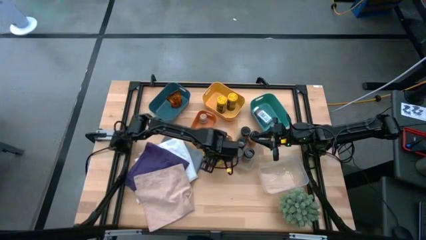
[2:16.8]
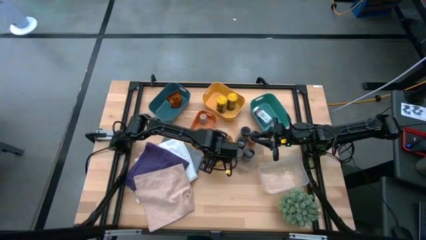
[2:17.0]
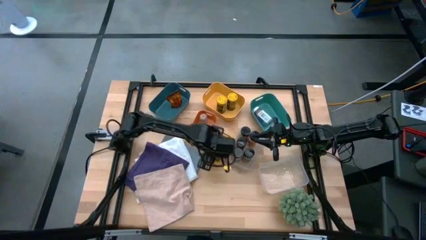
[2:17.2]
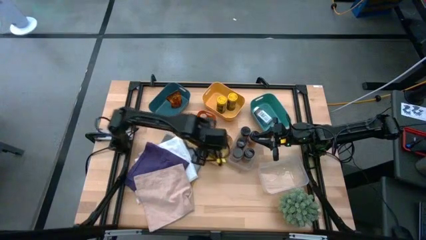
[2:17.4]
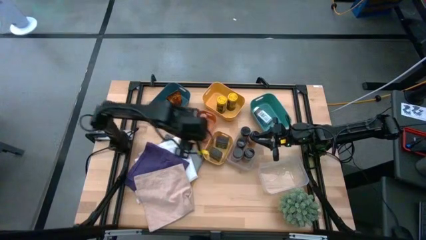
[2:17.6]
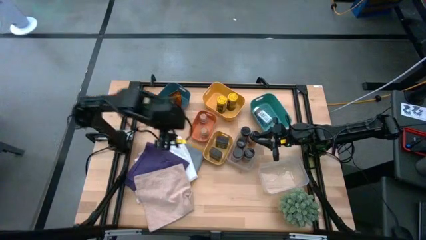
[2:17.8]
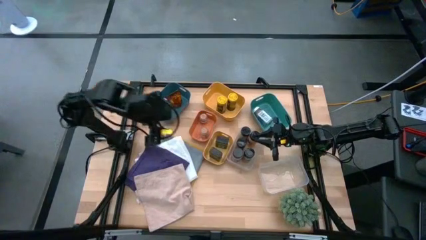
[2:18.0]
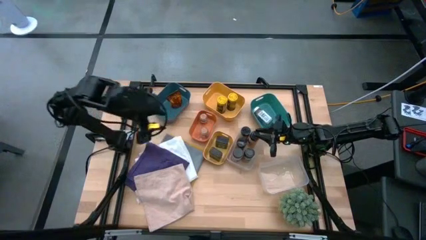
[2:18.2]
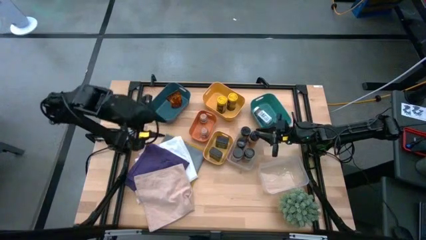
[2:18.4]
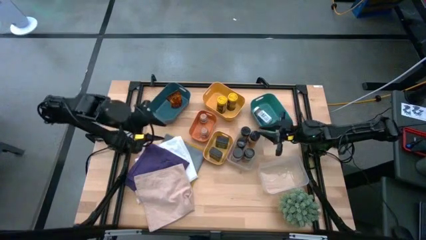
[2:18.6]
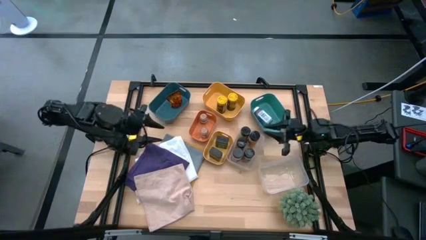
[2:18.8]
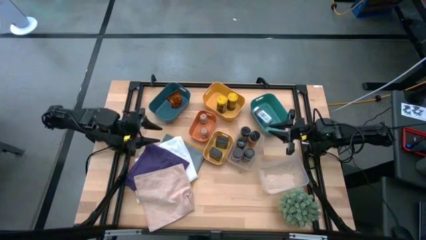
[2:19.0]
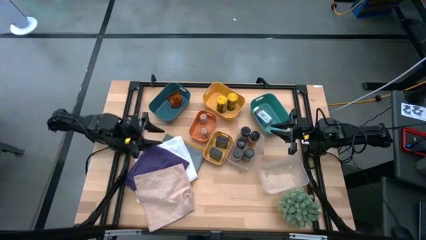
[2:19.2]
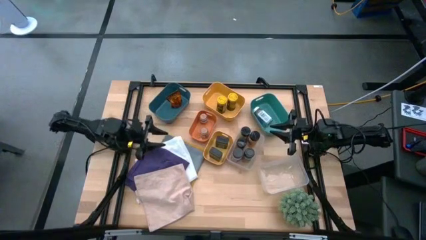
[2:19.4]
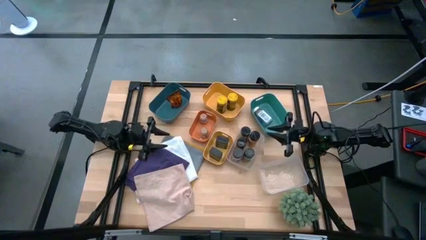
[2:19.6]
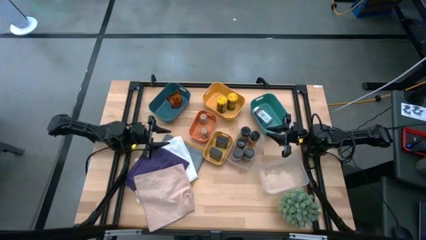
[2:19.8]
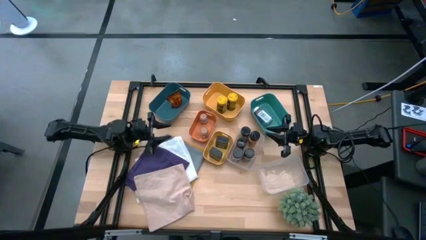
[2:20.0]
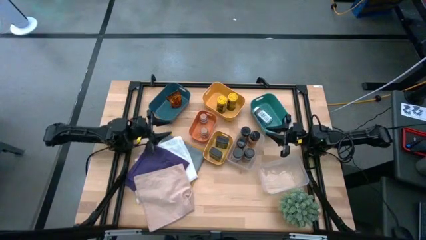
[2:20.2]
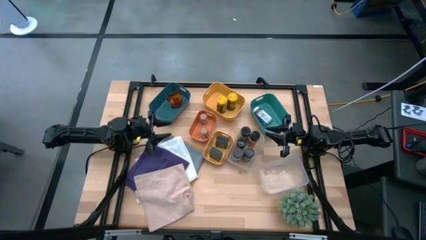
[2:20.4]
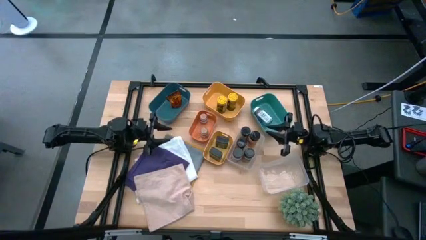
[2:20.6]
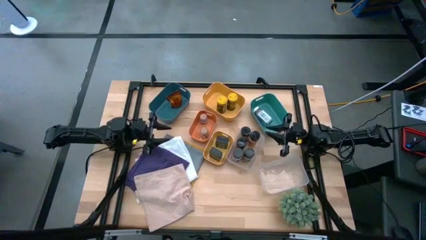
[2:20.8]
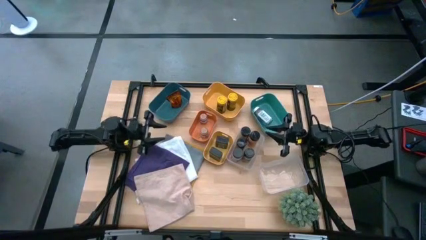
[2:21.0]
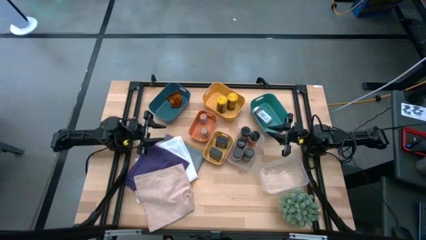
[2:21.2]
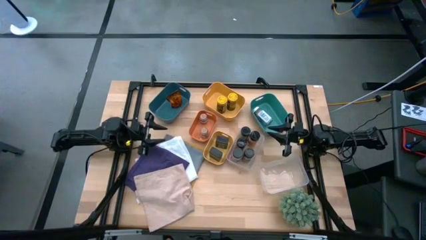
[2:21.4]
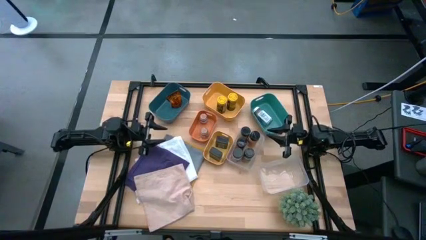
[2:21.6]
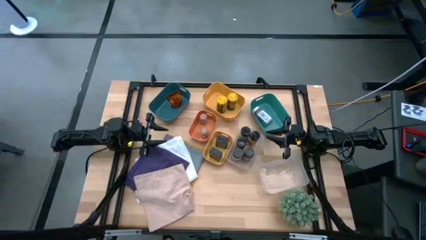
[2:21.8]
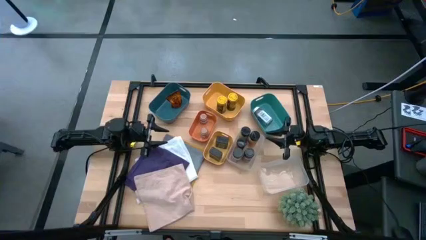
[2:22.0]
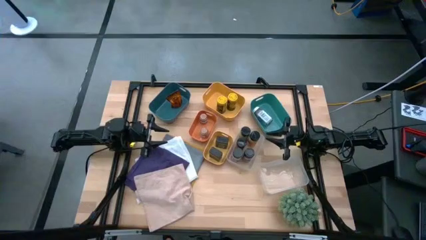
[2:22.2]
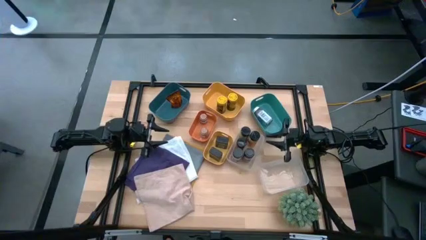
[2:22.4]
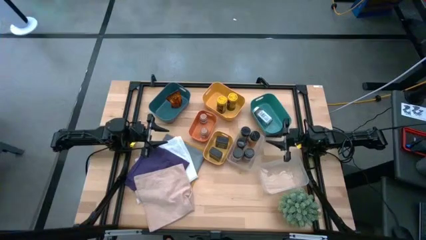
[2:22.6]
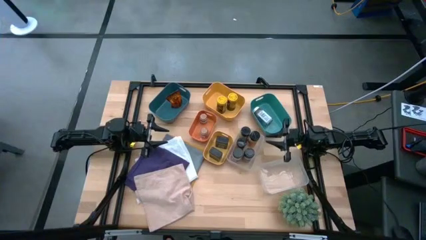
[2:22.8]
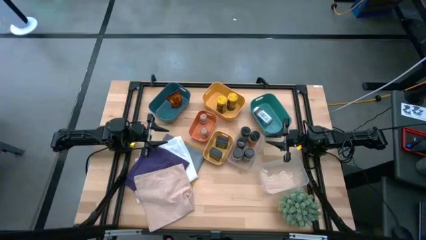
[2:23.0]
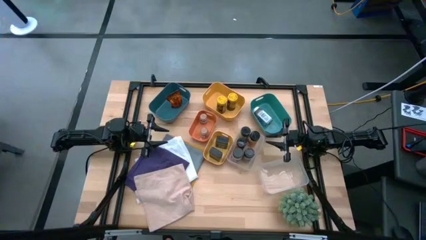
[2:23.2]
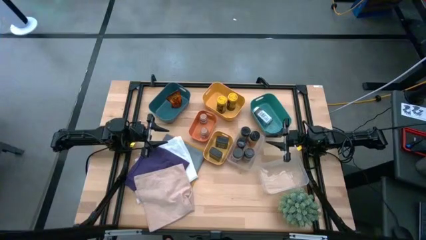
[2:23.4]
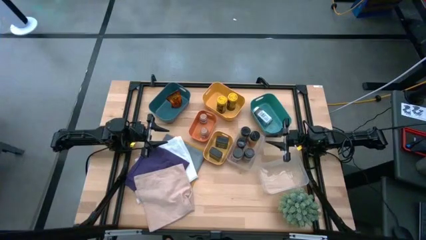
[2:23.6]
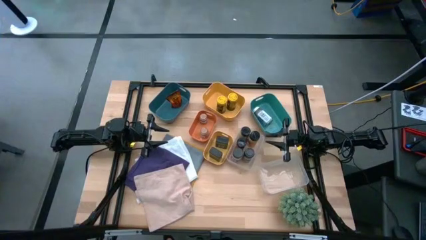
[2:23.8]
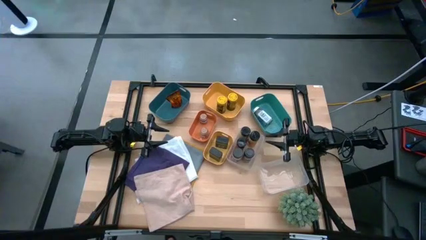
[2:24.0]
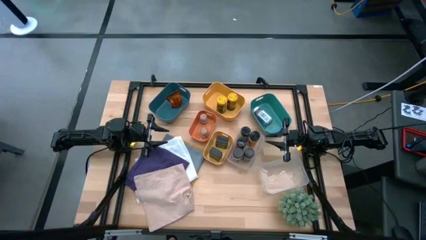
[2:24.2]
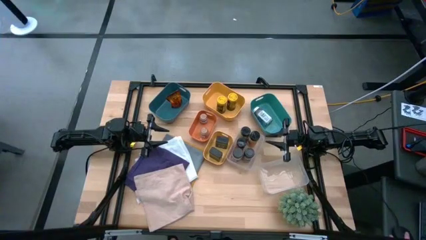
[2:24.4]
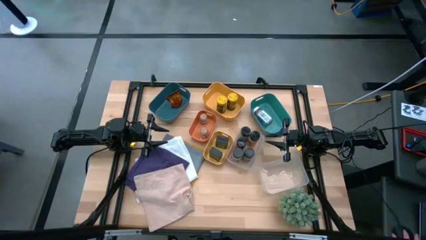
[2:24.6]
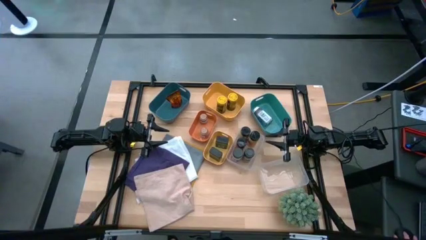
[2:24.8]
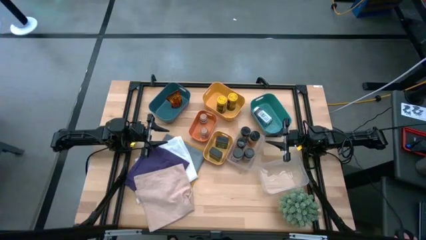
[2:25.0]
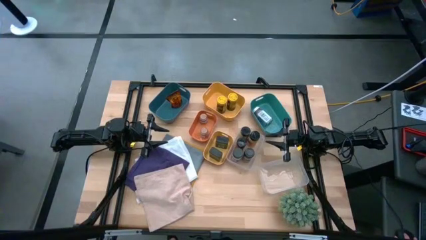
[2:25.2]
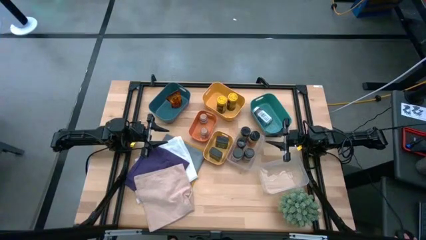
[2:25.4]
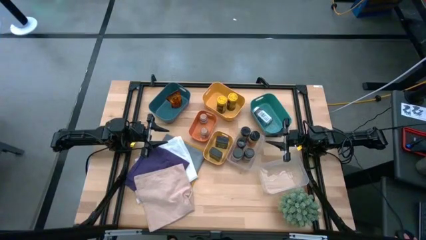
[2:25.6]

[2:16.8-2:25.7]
Task: Sort spices by type
Return to Home Position

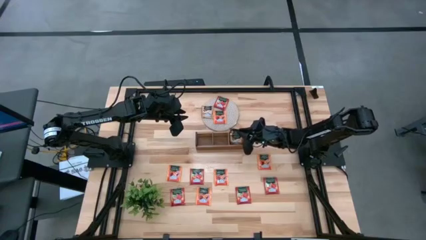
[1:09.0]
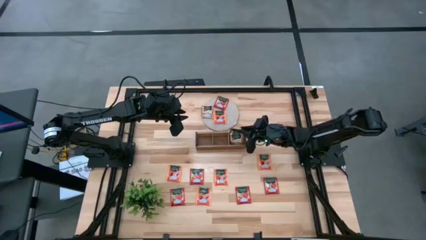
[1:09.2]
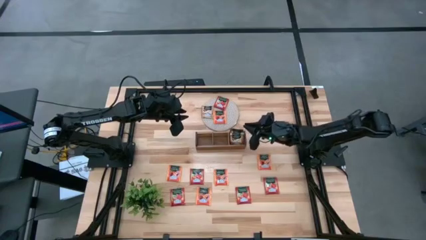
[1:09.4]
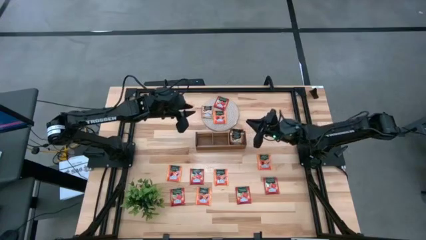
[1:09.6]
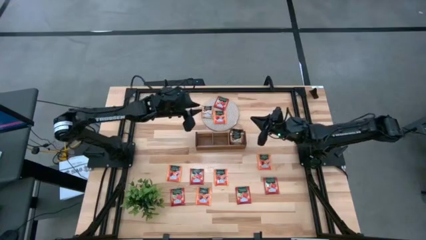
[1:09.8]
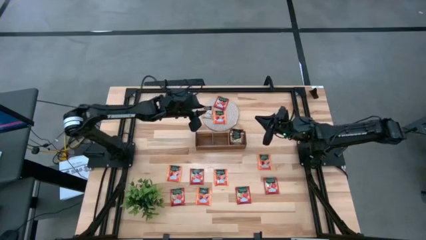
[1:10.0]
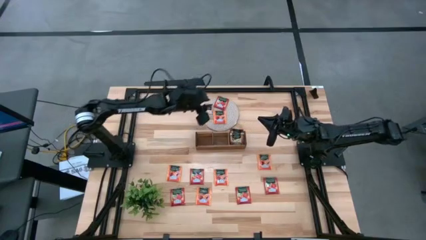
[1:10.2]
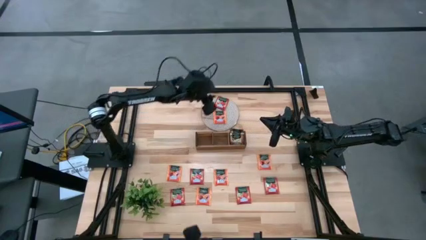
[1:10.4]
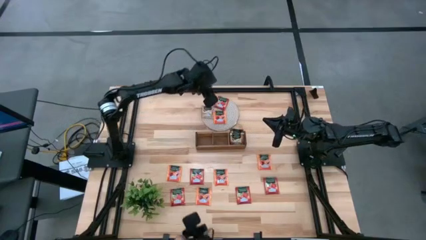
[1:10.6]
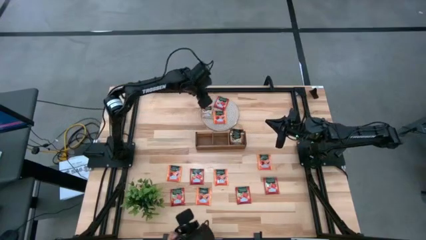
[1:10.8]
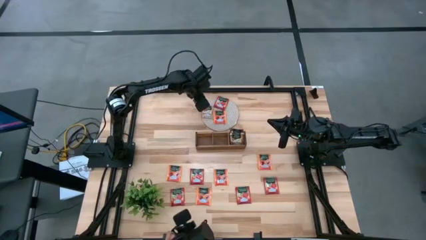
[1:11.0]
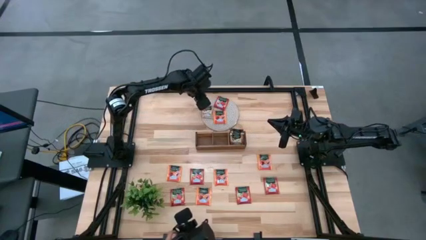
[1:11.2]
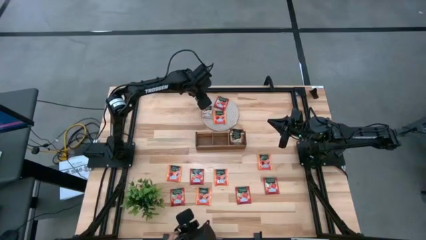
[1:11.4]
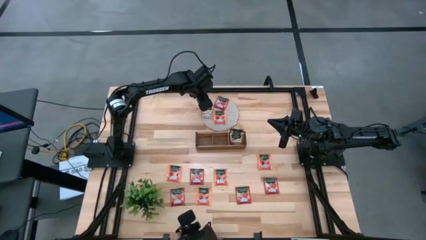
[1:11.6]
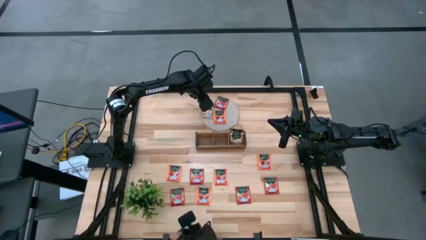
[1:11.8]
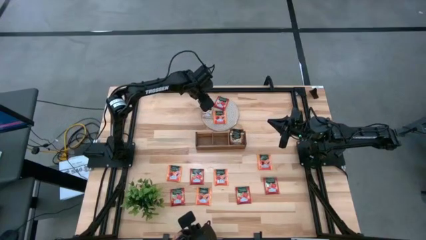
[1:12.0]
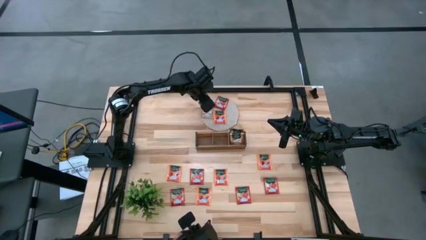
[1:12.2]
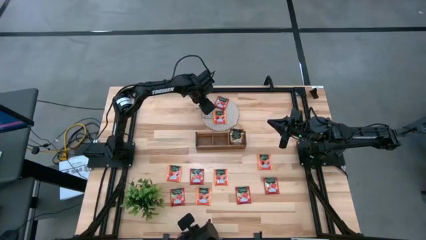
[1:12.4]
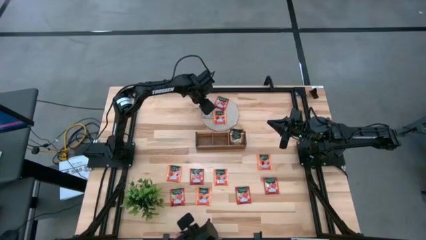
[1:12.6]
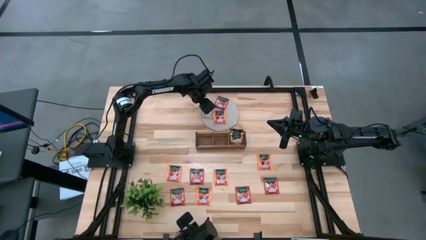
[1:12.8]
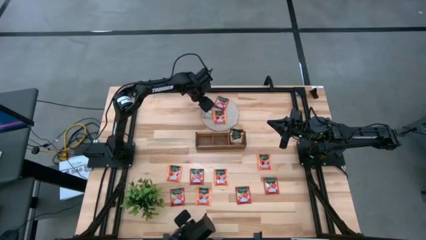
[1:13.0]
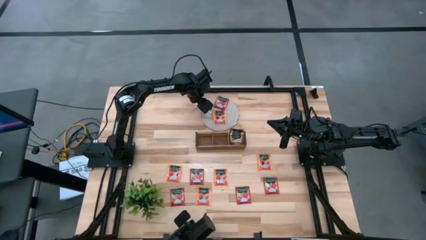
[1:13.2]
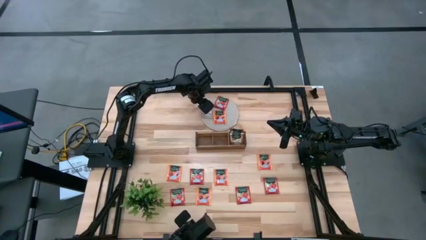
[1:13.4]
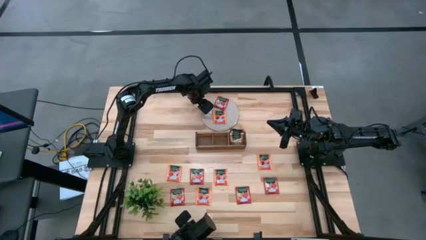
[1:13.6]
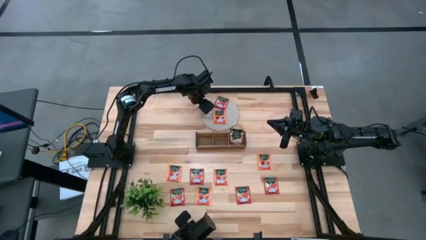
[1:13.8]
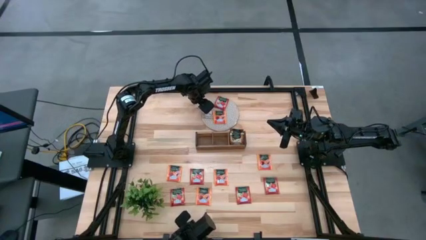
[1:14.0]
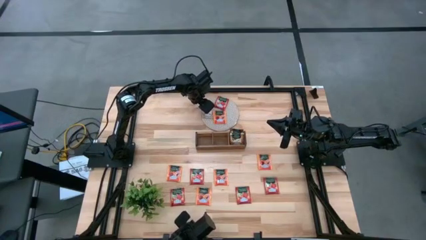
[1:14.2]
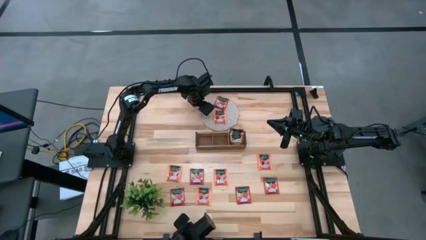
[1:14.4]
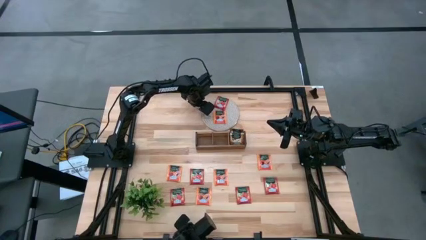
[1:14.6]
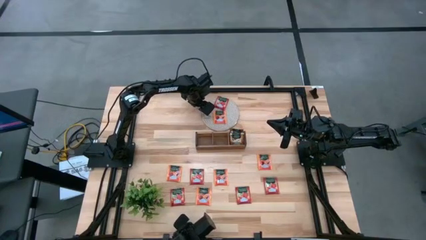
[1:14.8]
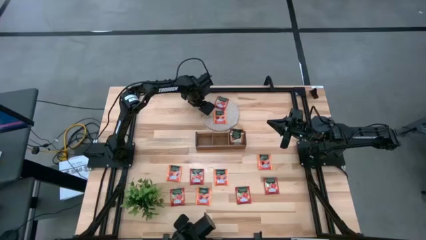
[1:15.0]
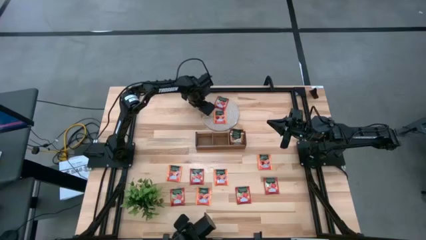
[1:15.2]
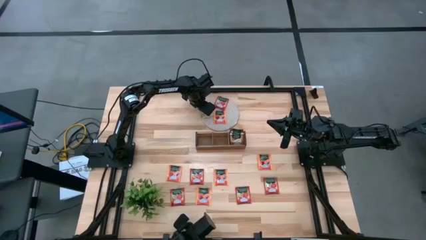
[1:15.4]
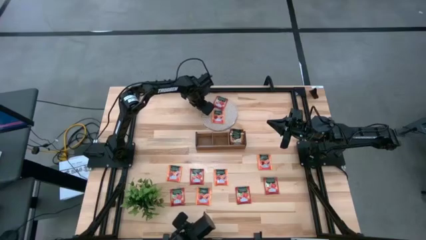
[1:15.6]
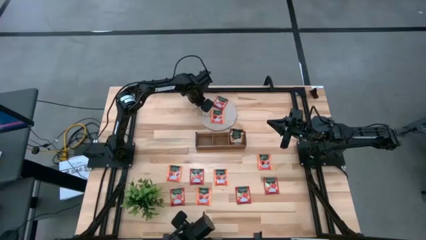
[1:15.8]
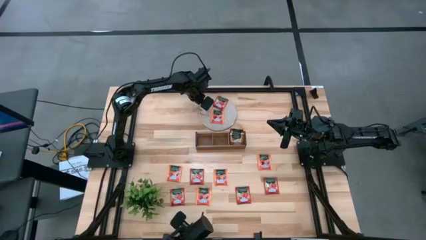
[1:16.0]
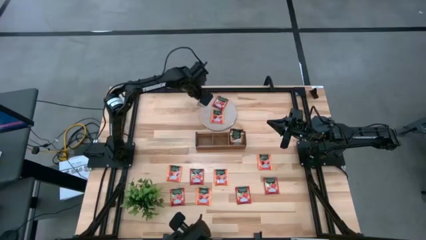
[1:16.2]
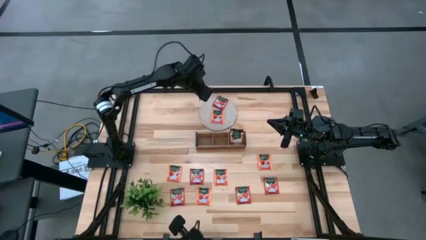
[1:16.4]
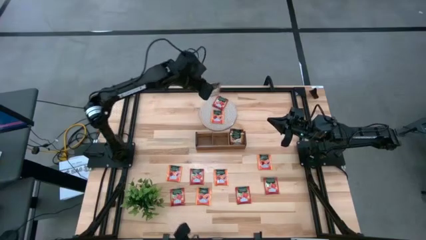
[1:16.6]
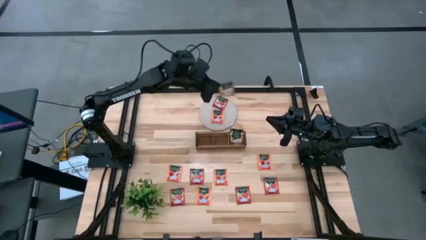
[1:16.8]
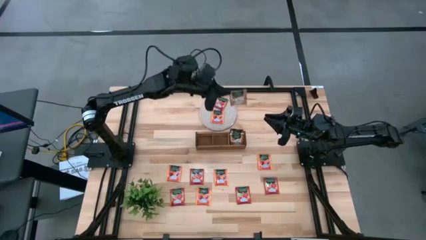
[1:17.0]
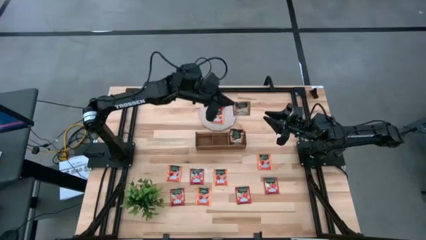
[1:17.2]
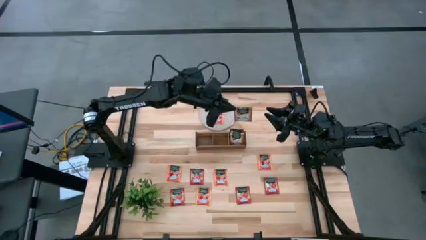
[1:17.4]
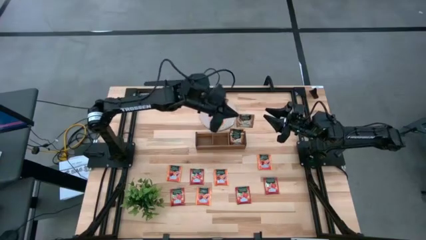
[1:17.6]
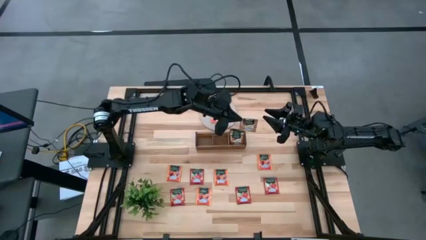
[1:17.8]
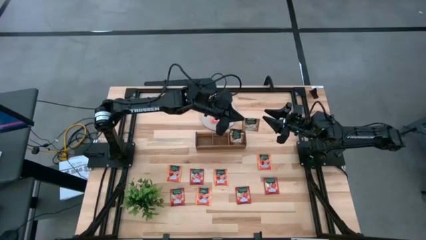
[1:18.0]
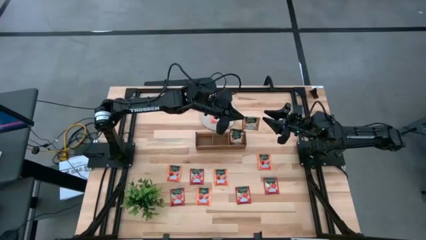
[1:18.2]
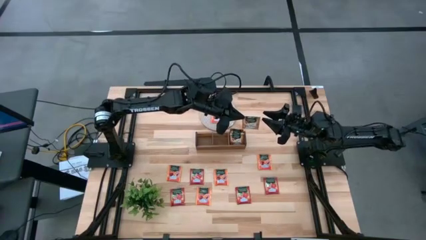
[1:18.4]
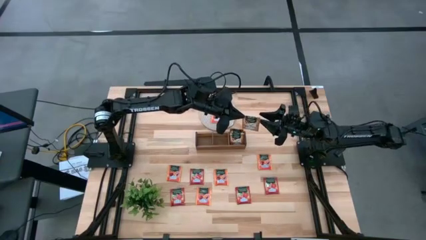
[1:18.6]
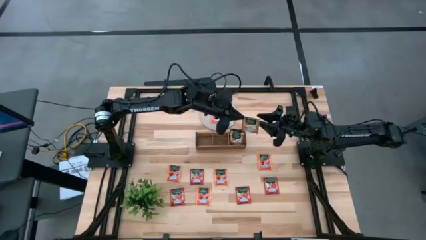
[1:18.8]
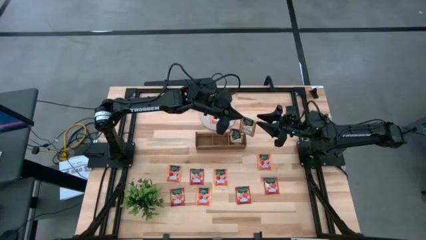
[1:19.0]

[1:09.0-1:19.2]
Task: Pick & Place Tea
Put the brown tea bag into the right section of the wooden organizer
